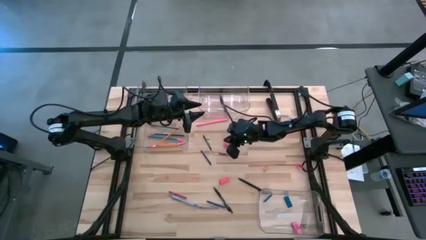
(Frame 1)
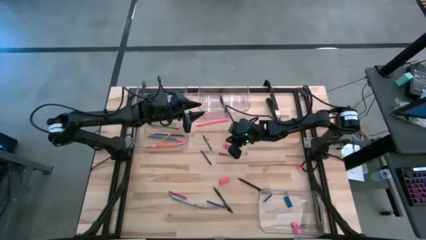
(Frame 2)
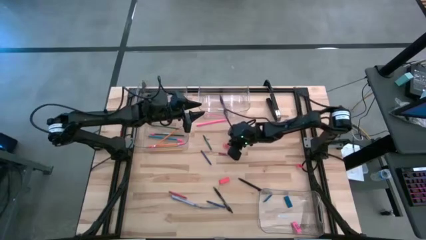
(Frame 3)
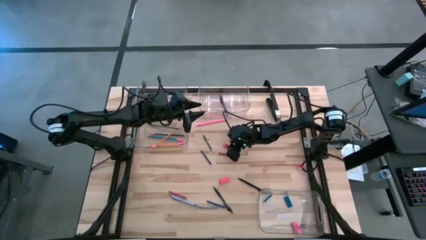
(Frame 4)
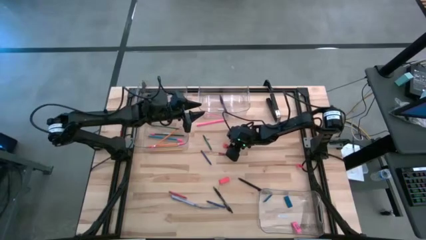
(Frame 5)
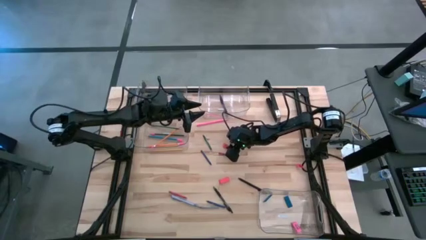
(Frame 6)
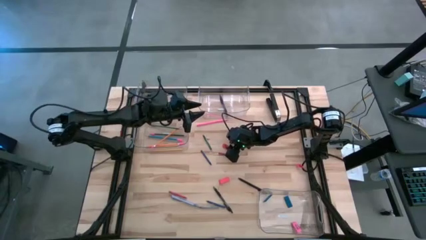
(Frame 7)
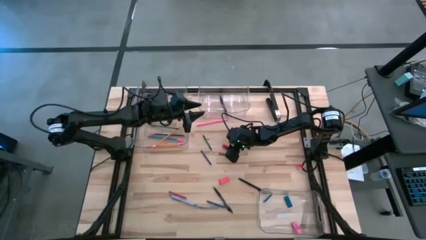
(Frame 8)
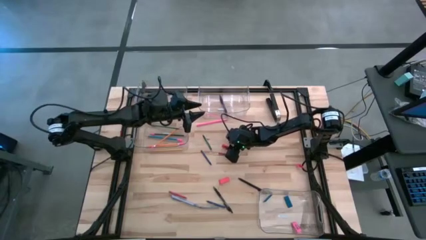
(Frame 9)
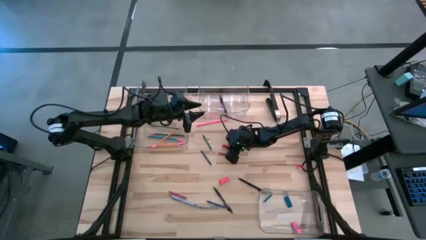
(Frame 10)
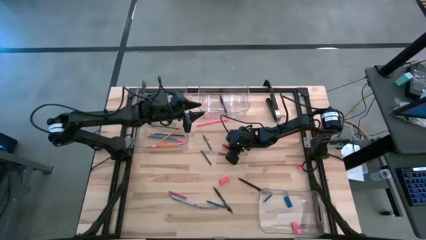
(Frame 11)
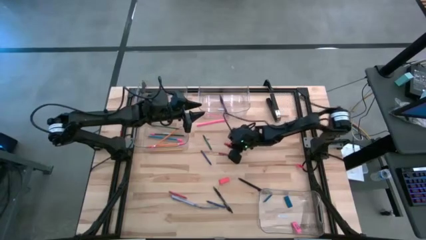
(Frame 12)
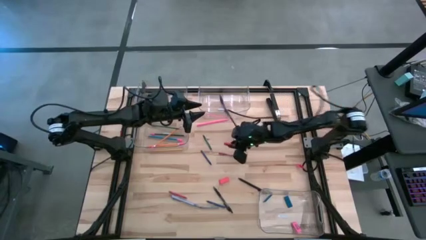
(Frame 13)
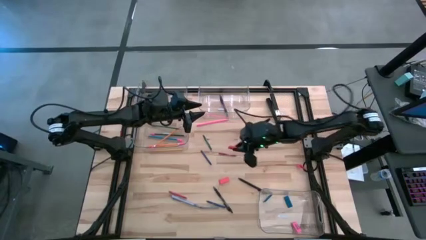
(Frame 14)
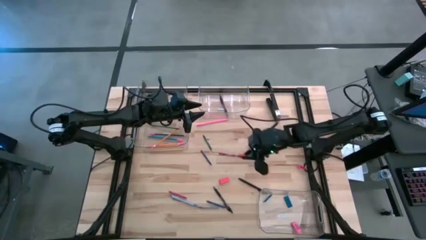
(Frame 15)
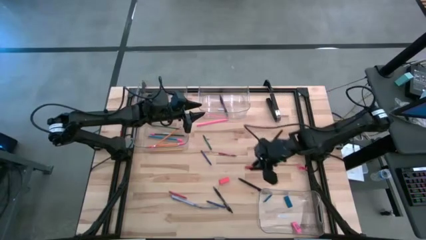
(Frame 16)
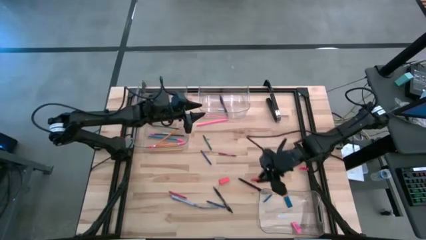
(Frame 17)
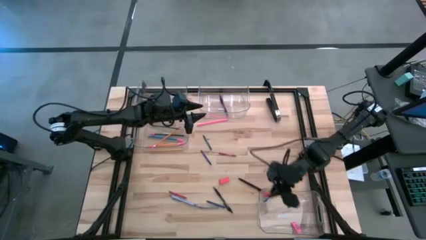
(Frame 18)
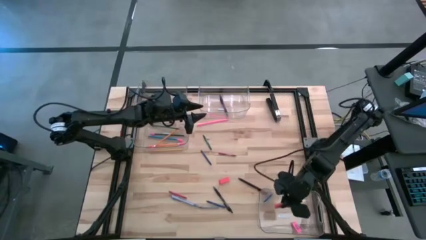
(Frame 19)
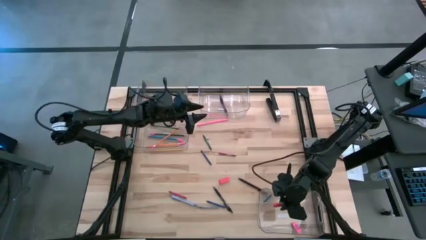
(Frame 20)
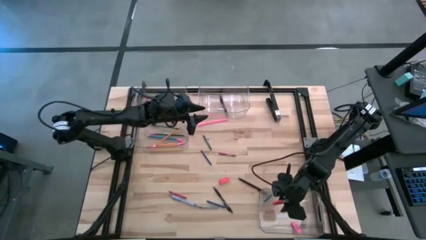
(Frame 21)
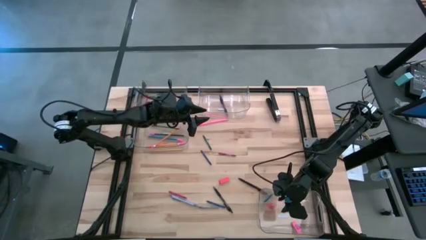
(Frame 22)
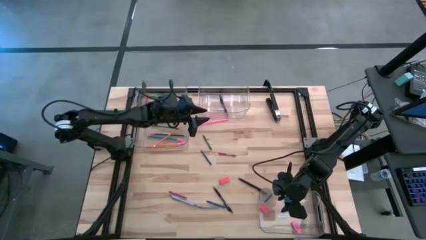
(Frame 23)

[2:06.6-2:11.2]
Task: Sort crayons/erasers/pens/pencils in bins
Put the orange eraser into the bottom right transparent bin

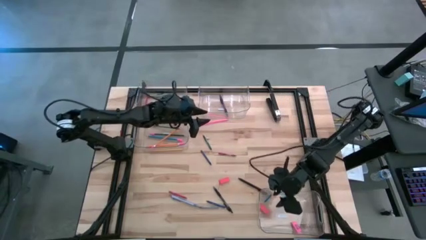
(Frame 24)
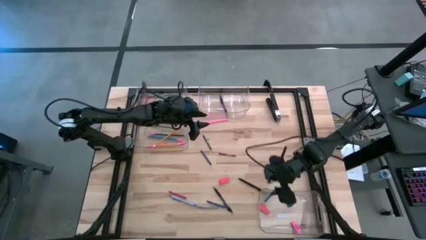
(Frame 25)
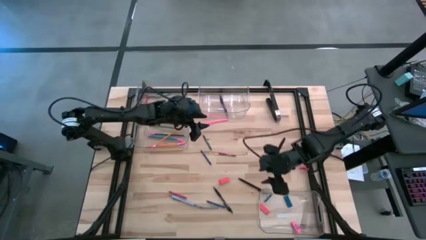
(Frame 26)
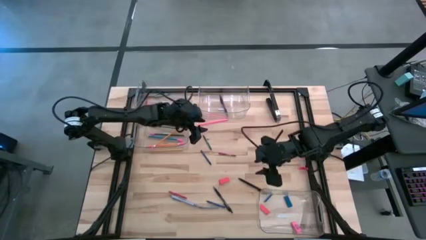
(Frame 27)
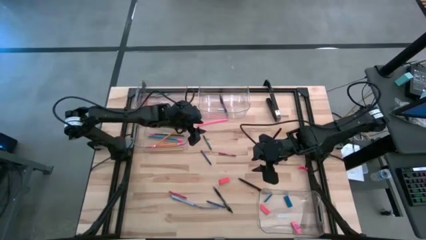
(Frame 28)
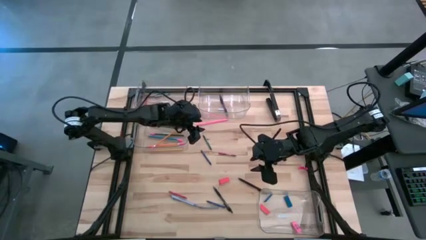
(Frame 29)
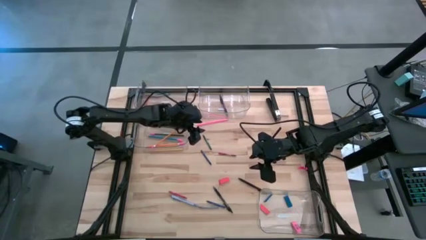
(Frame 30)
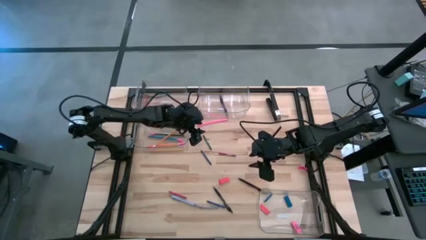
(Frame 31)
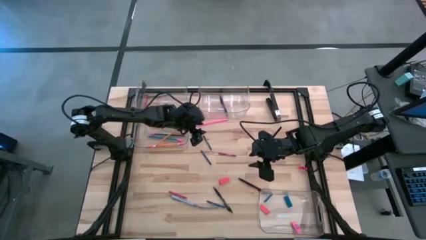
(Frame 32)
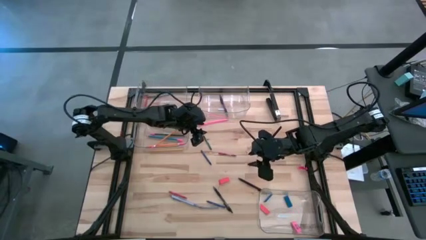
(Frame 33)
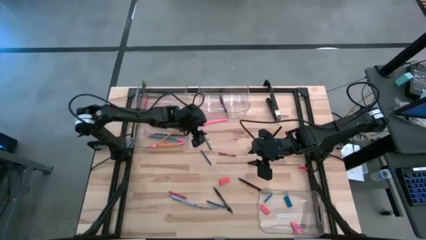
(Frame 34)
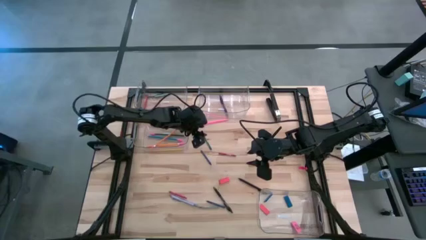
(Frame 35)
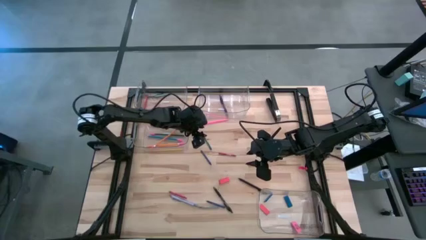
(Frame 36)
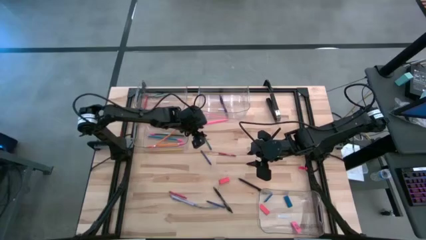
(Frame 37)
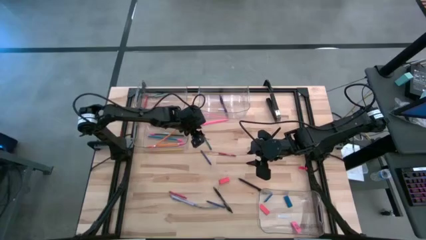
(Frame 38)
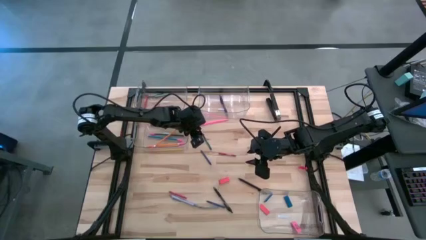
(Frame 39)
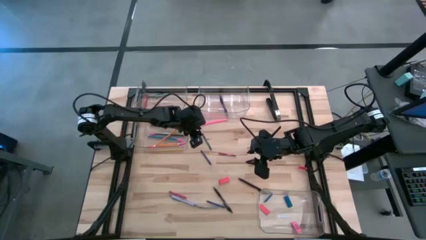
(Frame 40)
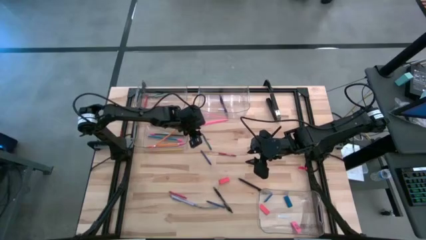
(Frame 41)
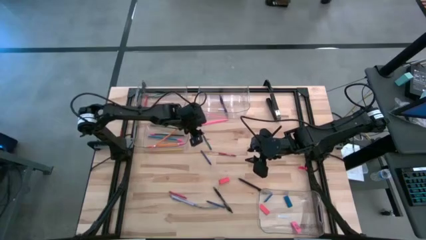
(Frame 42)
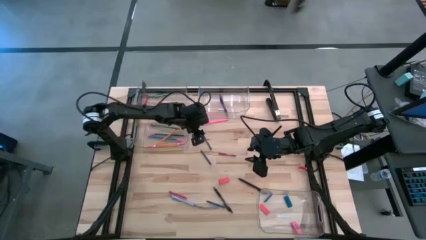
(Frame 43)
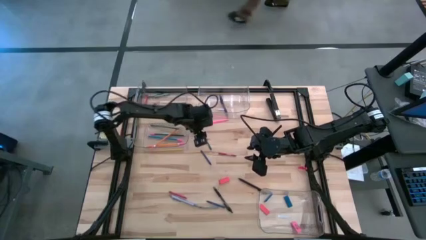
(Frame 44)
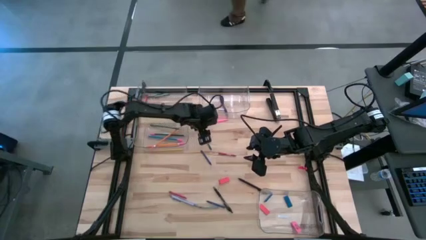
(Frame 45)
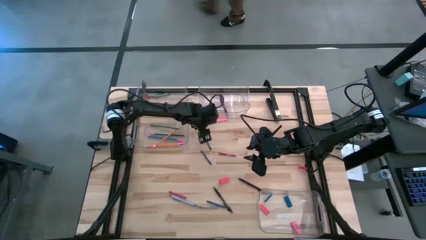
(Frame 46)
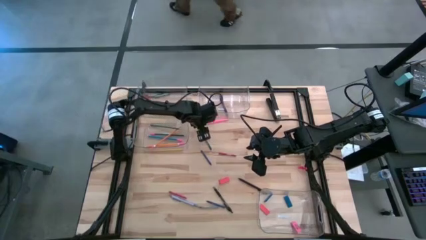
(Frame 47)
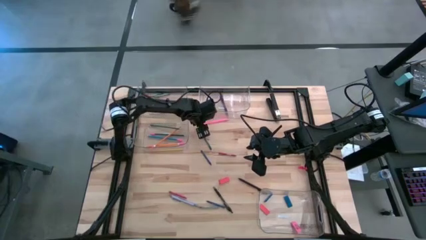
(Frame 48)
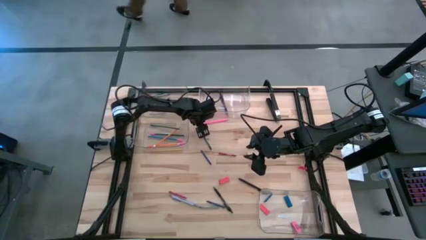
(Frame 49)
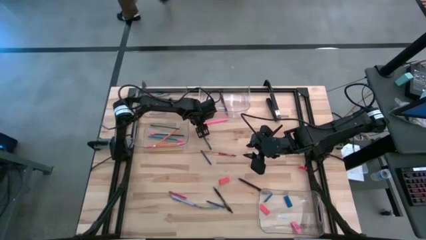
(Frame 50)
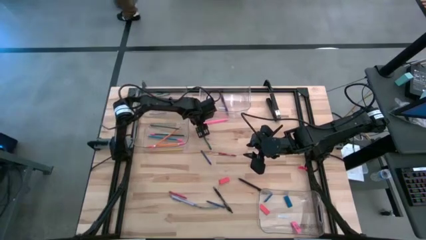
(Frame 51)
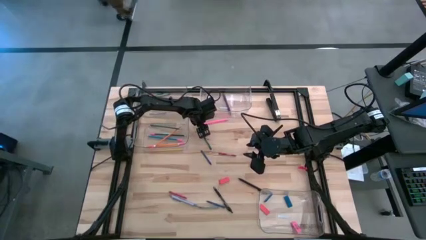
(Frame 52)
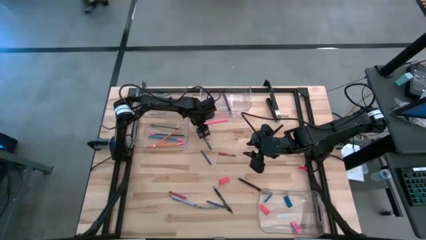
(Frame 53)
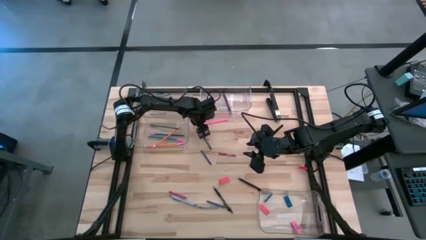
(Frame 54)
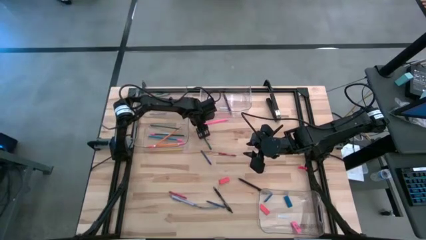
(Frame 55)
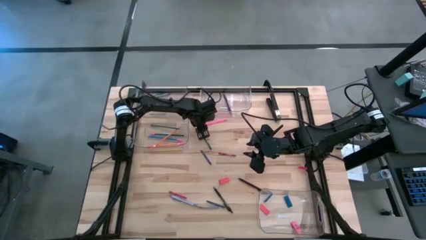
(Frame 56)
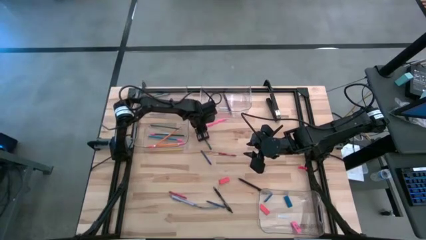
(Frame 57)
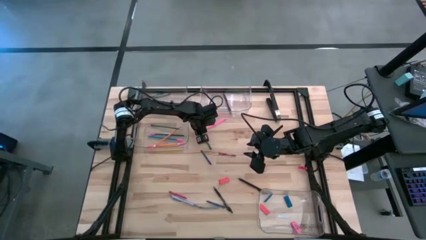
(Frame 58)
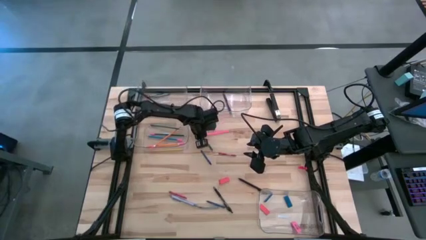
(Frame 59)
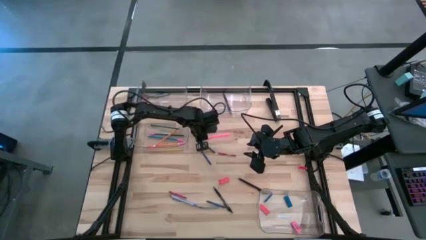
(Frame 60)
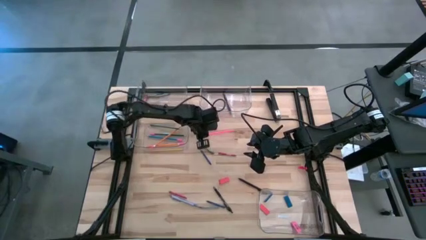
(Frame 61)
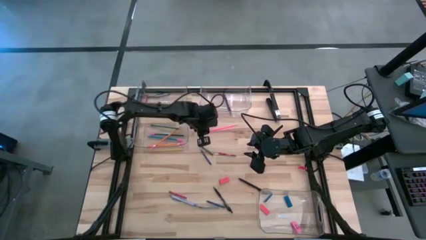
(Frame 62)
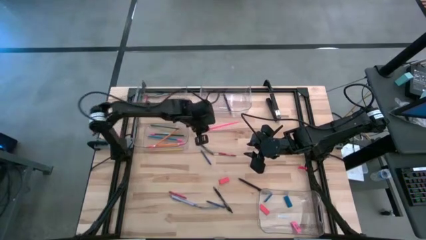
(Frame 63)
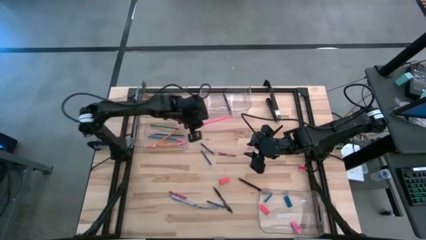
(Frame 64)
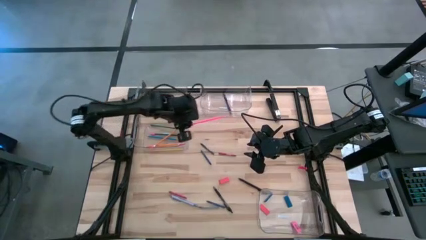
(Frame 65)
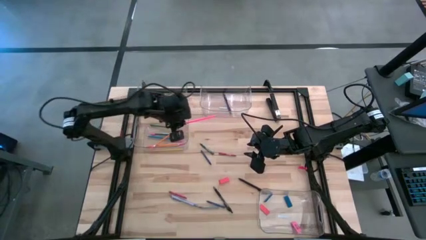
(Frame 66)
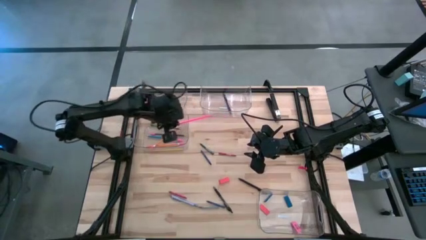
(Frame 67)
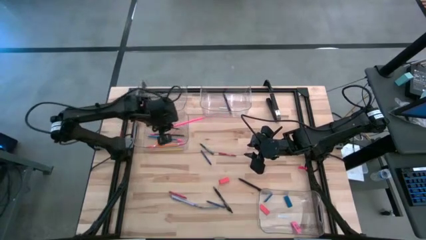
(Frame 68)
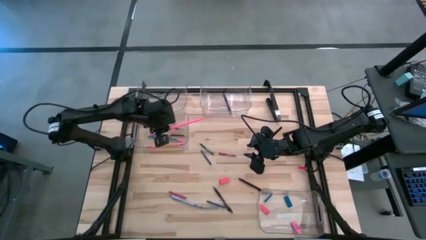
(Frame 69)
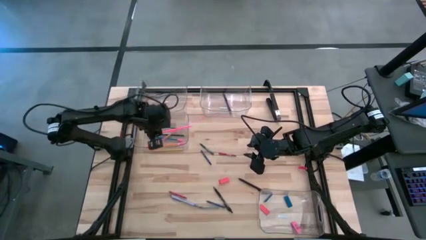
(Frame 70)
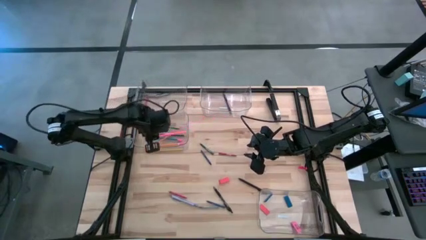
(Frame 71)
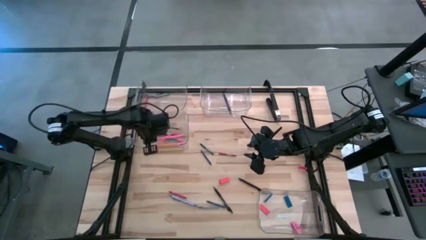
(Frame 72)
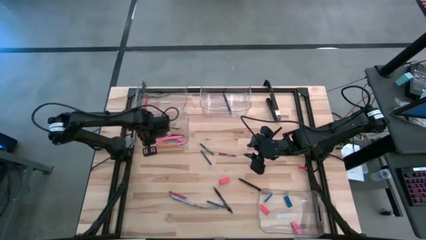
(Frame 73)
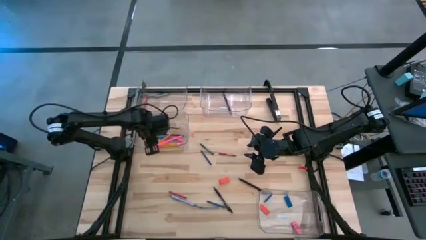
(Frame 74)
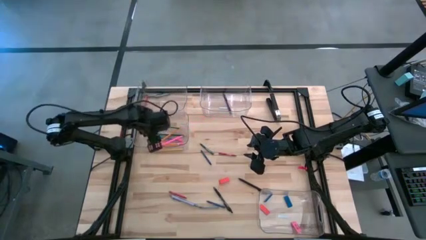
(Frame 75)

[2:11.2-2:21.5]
Put the pink colored pencil into the bottom left transparent bin

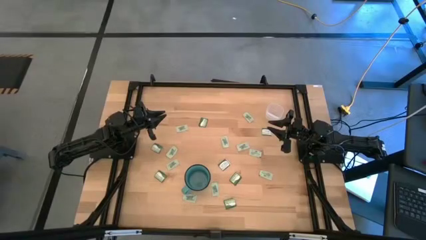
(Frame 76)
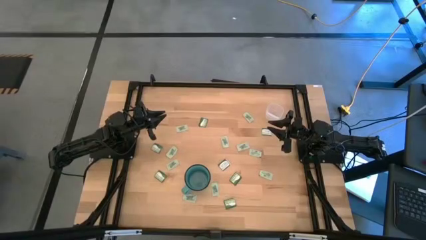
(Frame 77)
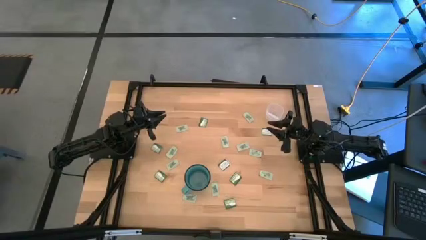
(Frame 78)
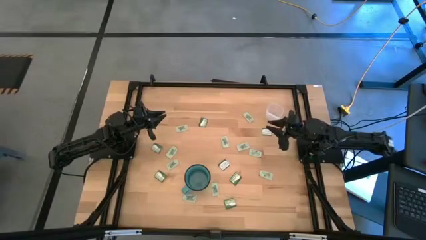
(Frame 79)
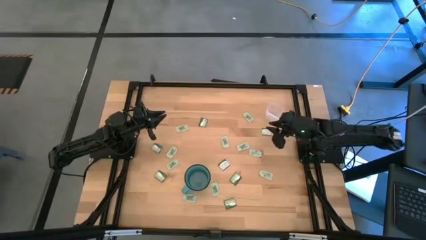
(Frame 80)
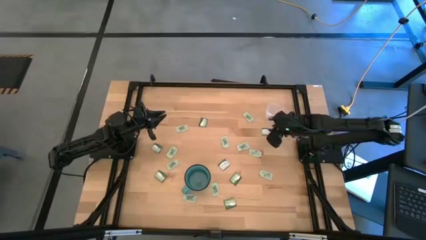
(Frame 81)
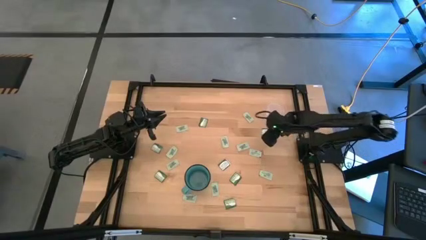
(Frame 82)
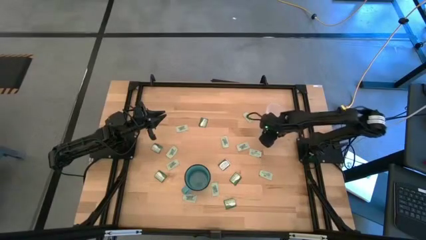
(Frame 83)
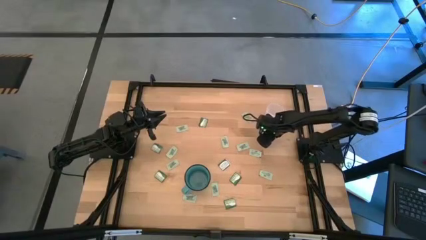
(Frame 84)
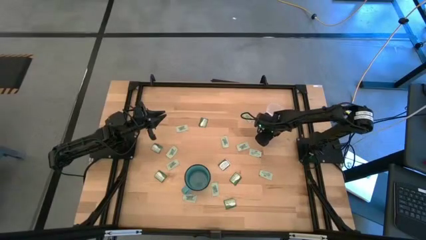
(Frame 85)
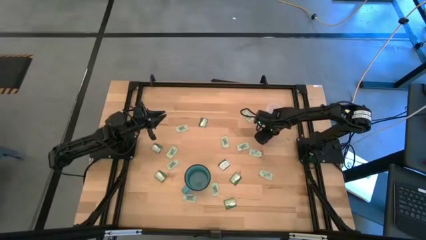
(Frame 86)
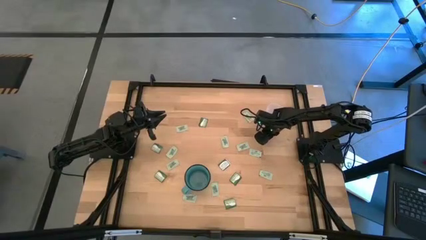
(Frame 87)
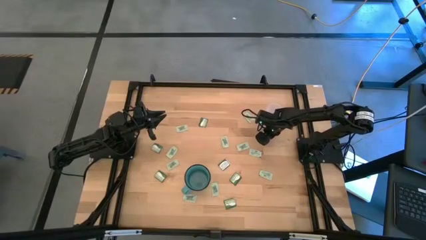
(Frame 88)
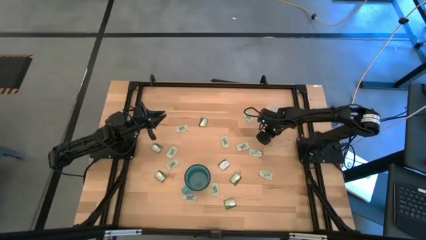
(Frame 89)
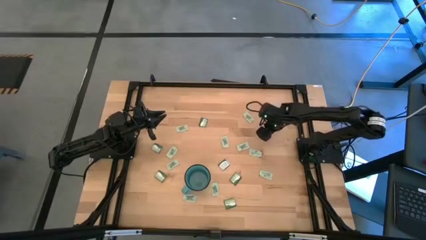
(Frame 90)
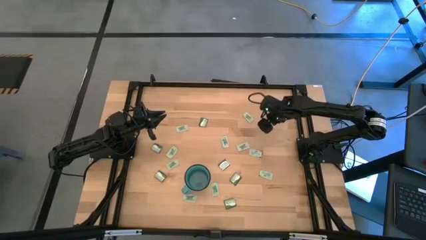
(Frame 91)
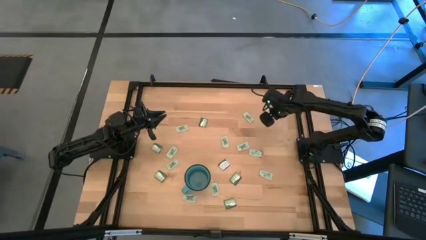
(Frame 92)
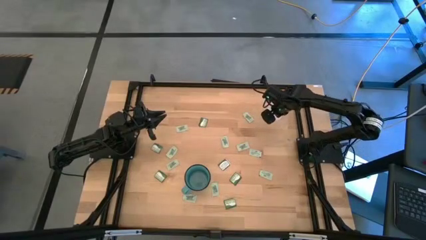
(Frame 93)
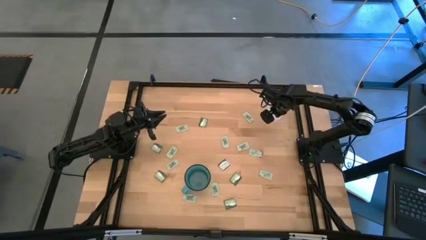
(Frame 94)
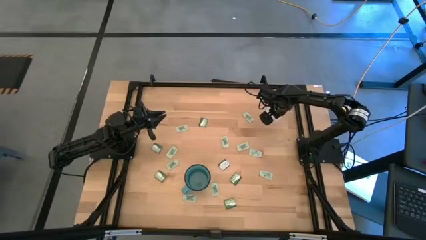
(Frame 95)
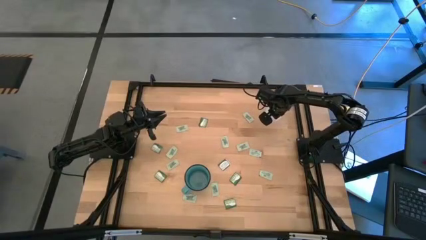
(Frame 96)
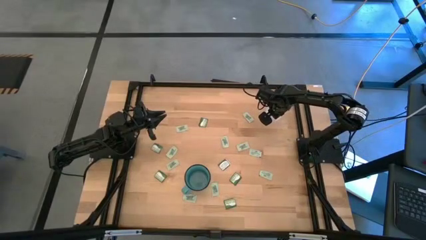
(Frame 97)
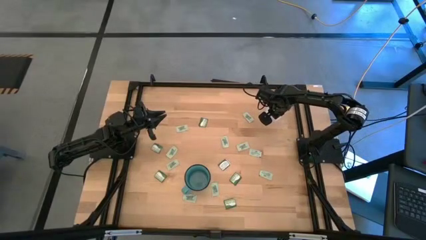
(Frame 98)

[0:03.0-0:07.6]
Task: Pick and place items into bin
Put the truvia packet into the transparent bin
